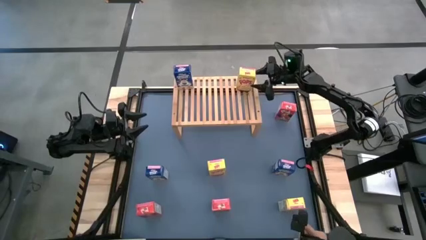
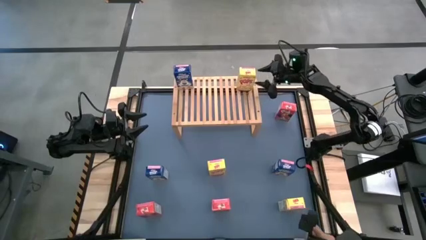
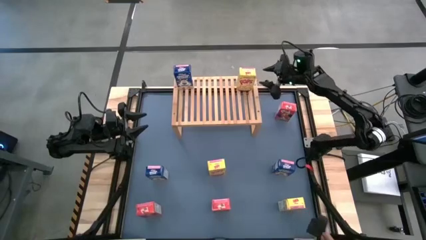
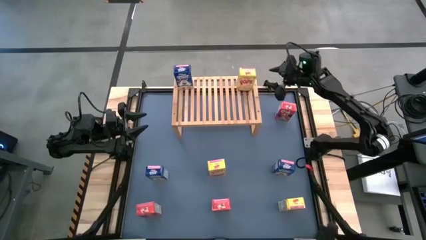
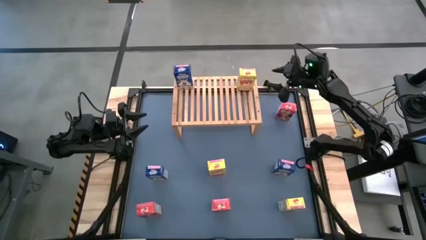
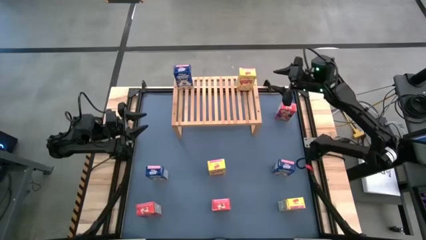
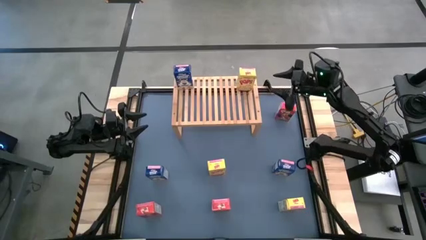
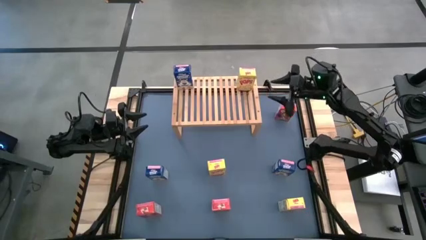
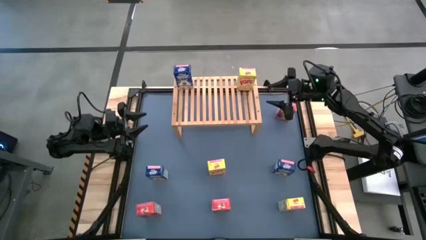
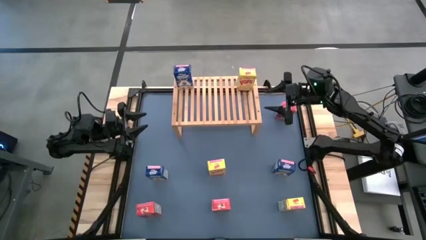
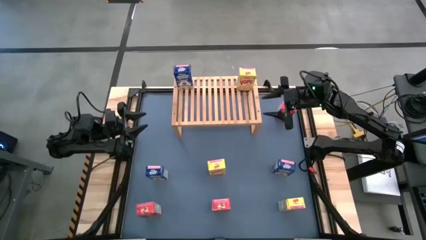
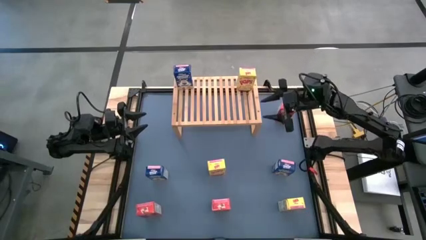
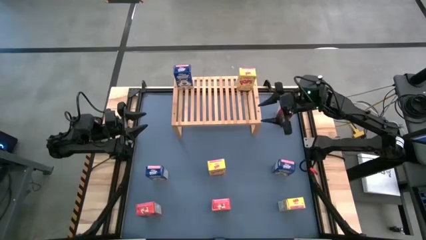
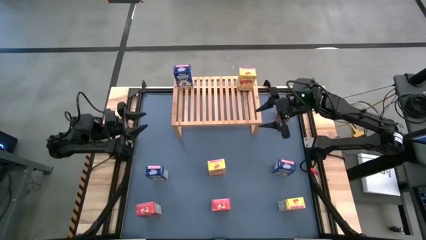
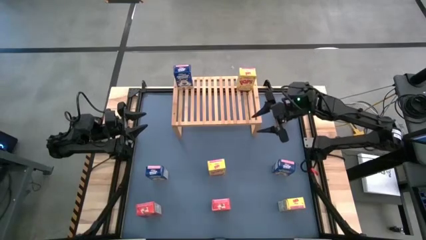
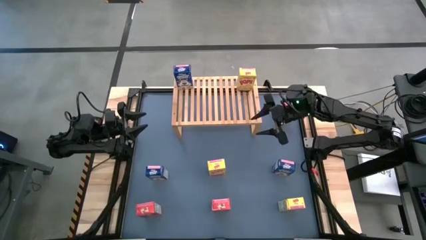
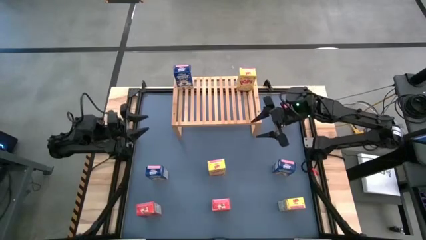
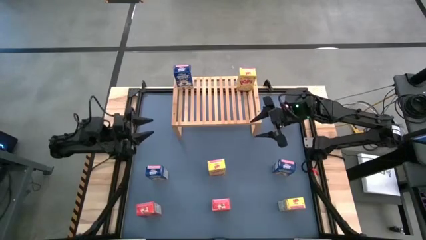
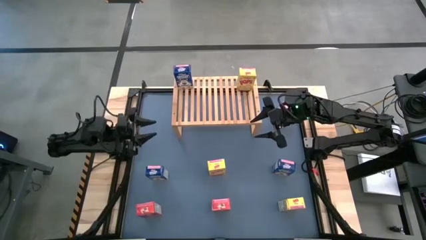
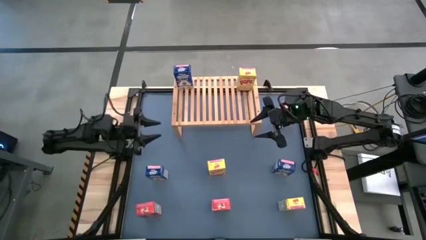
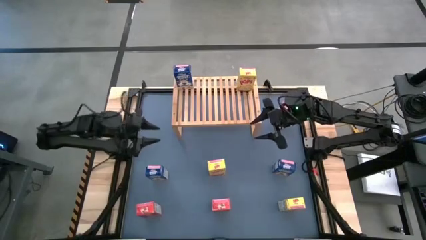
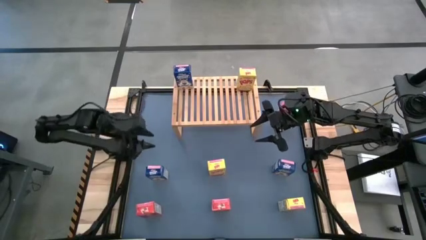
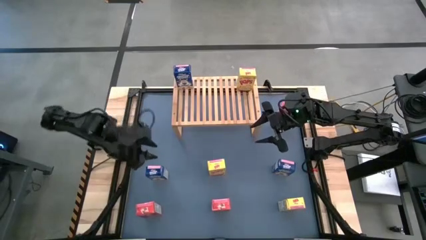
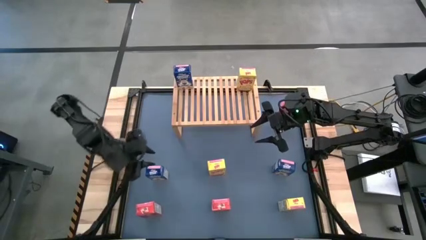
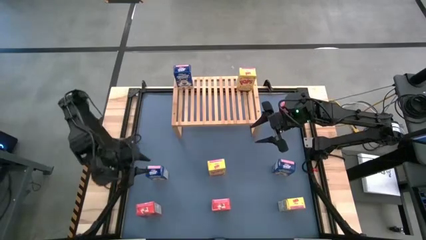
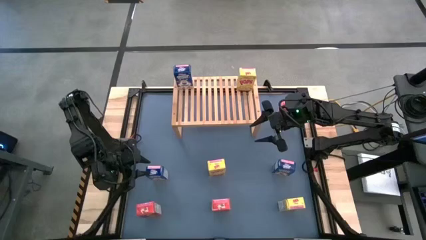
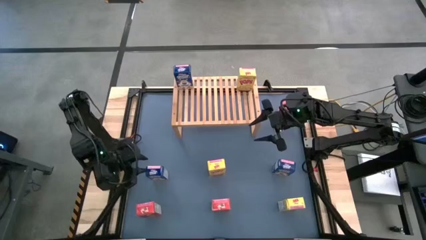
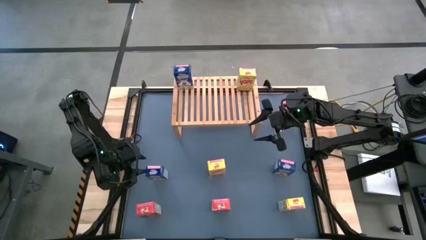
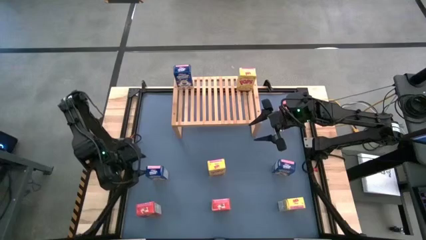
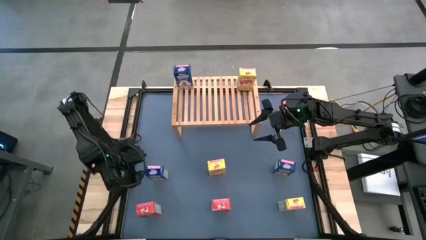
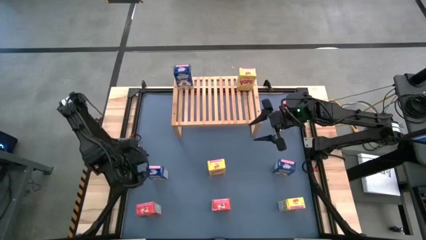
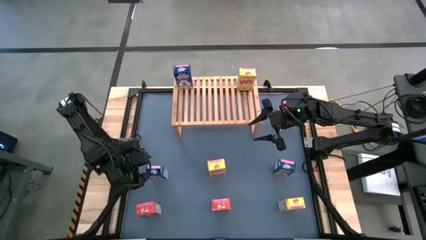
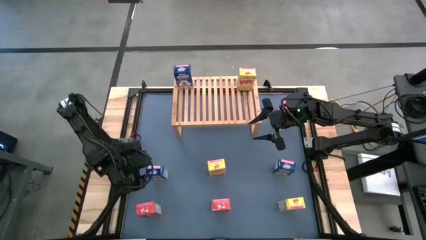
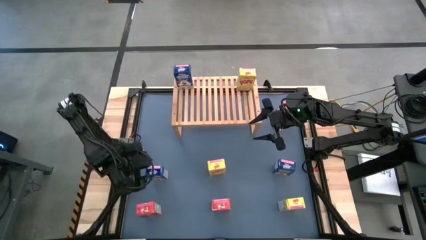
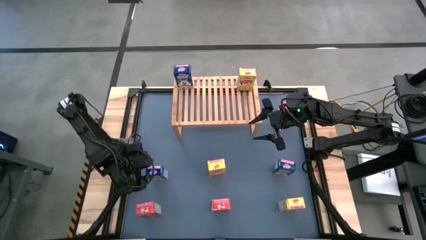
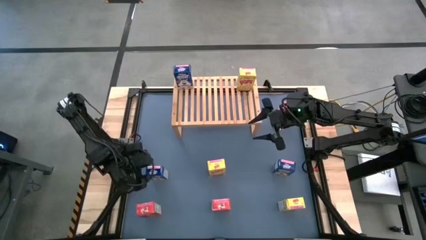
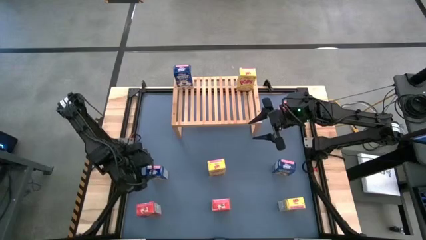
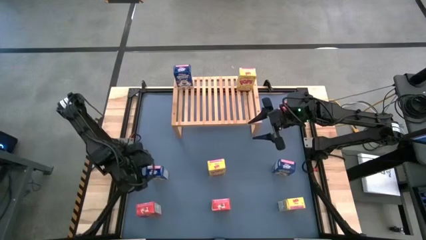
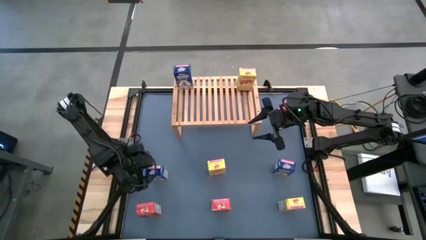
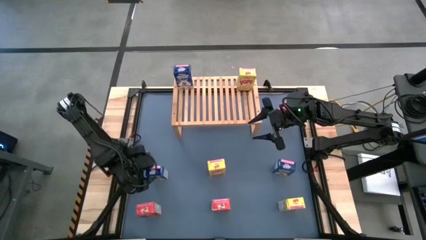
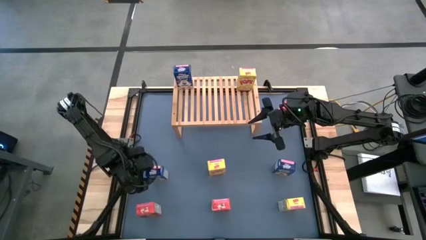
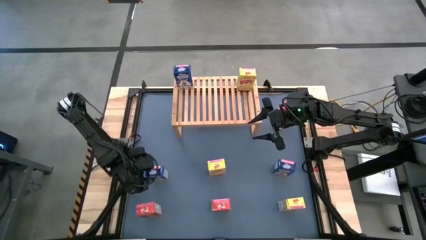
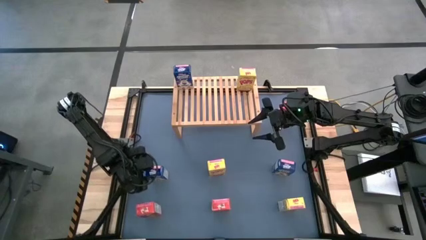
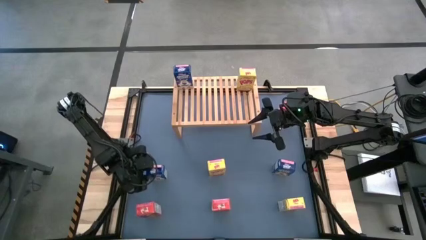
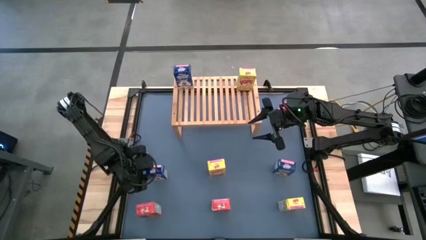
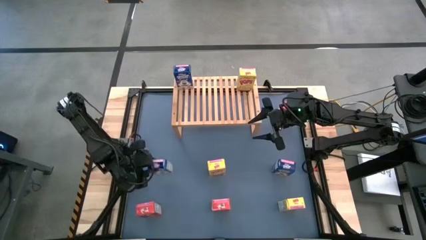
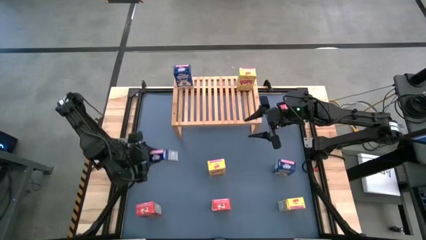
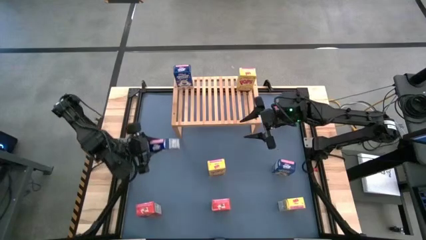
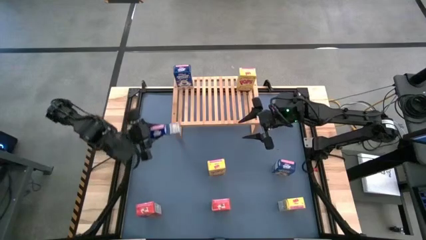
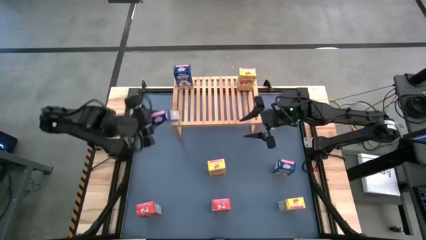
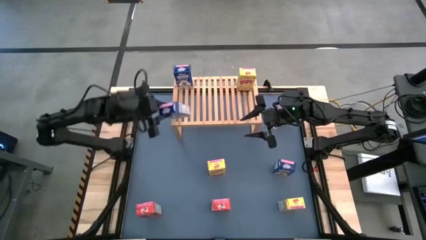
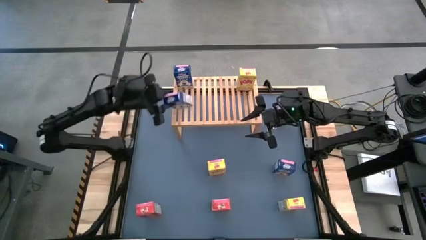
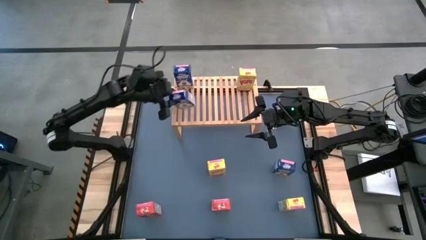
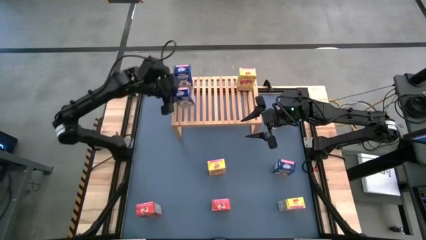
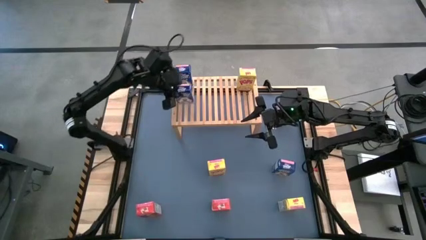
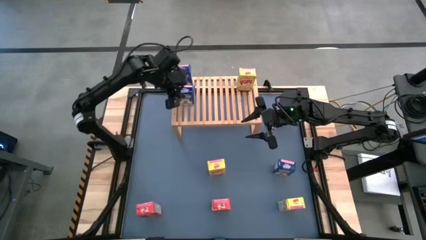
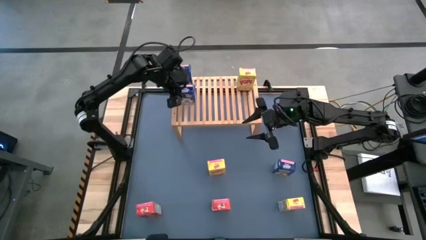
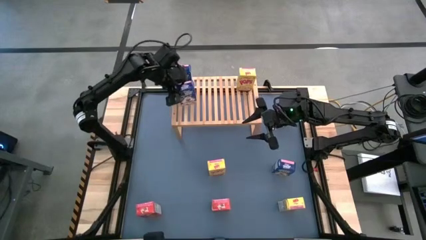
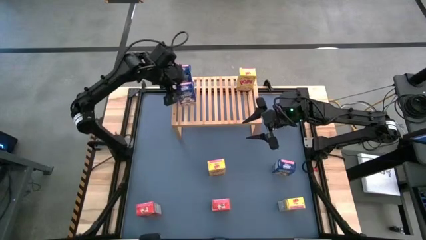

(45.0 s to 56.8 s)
Task: Stack cereal on shelf
Put the left blue cereal box on the shelf aligned with the other blue cereal box

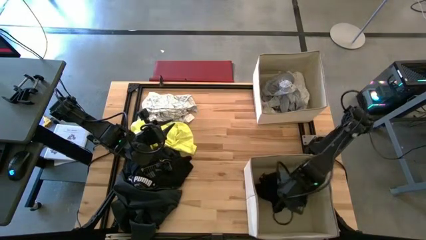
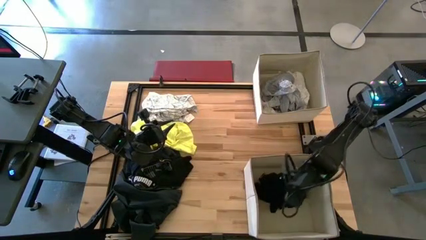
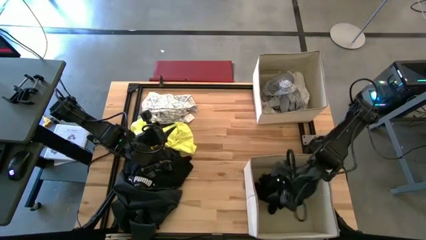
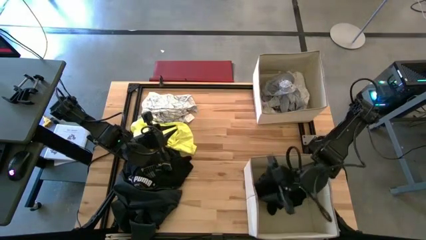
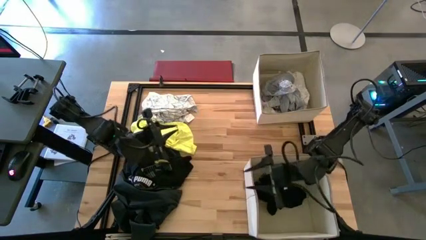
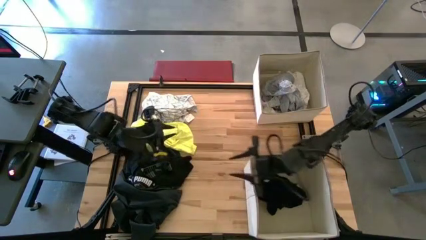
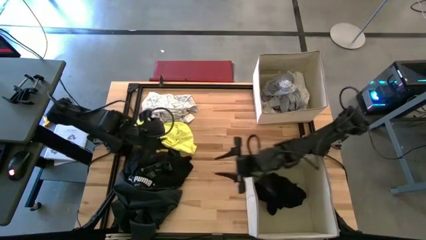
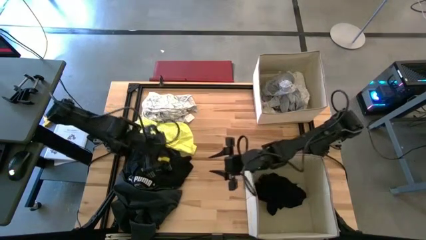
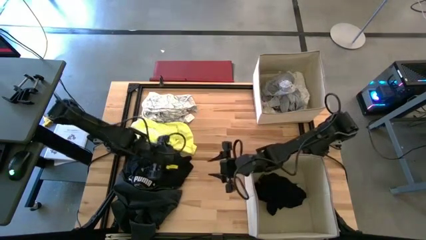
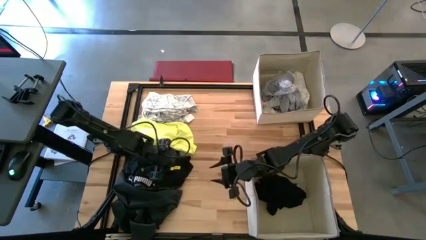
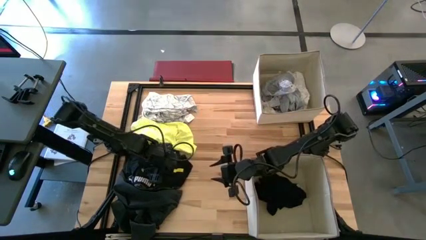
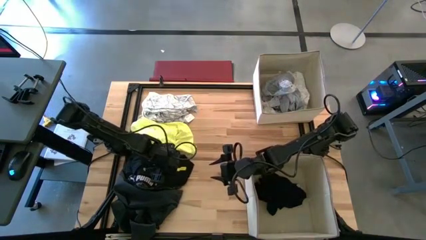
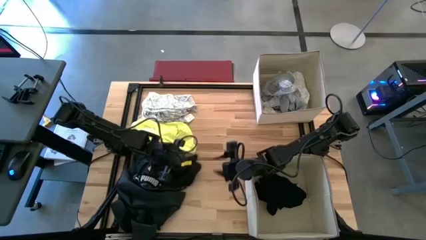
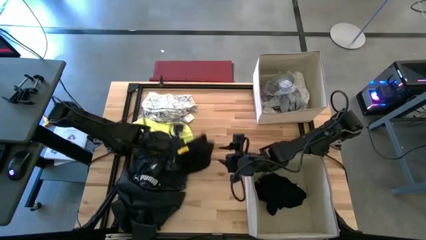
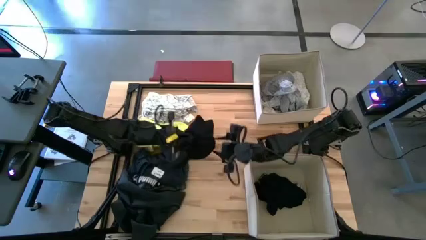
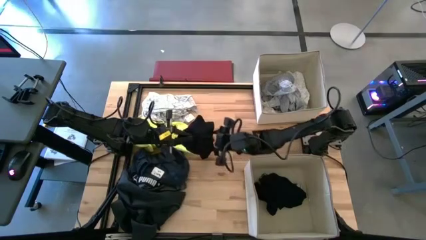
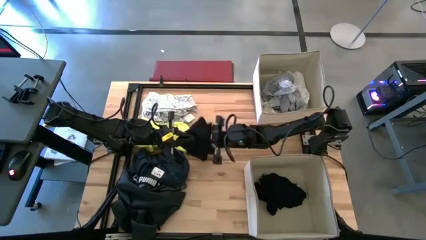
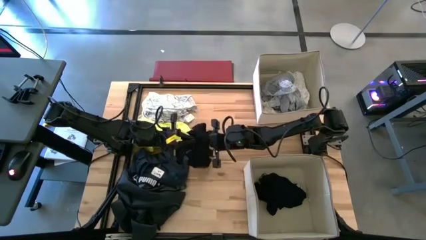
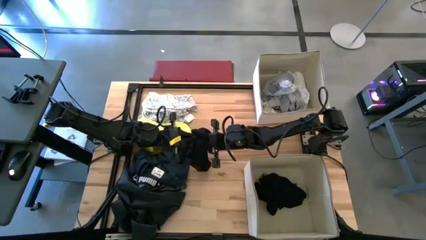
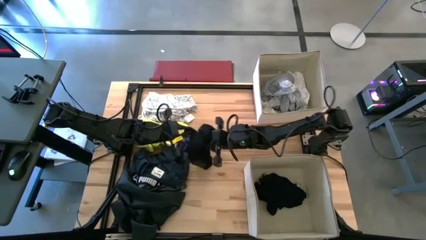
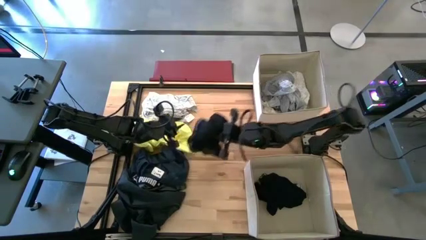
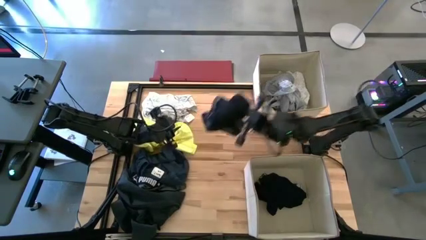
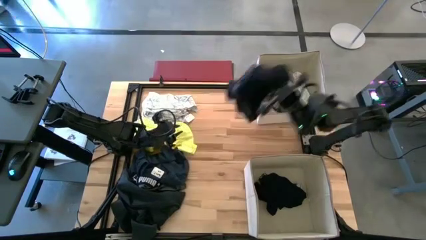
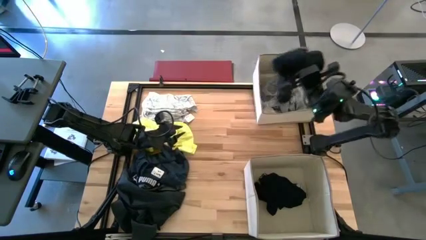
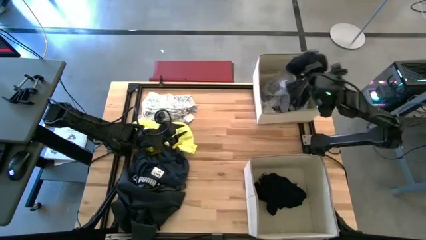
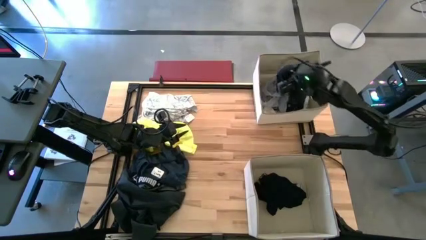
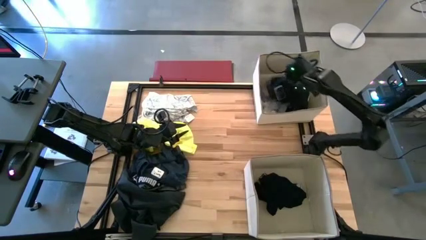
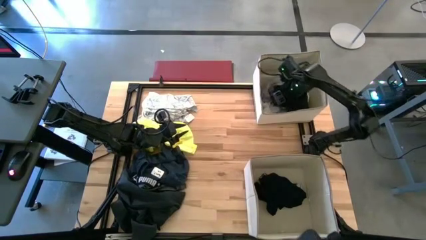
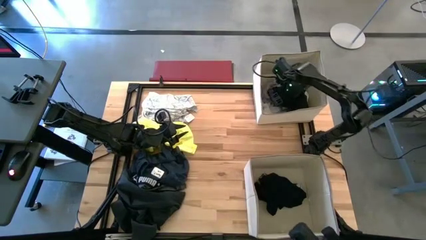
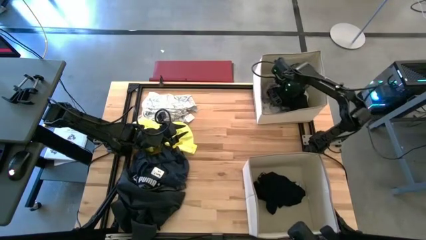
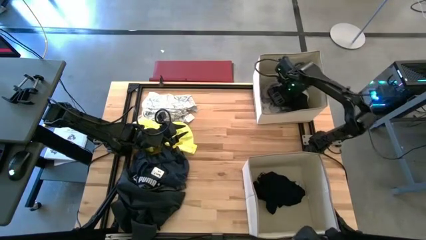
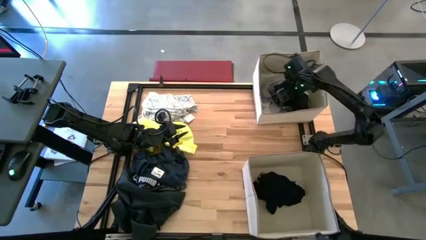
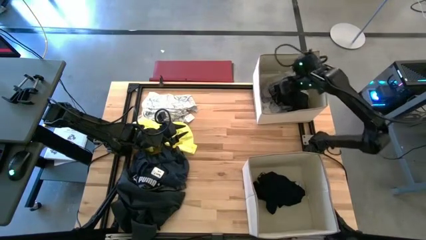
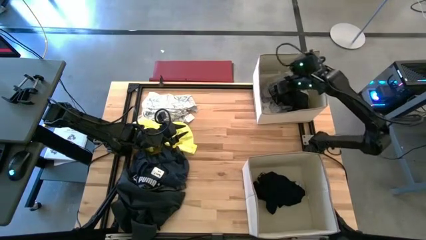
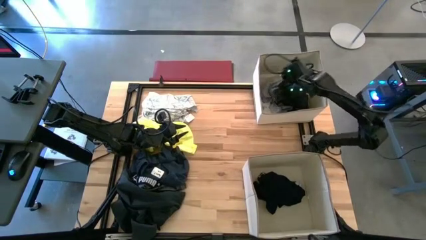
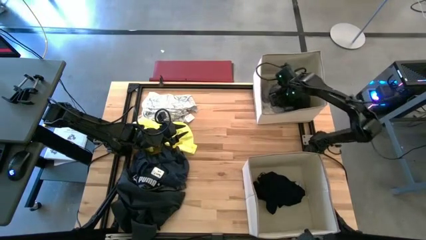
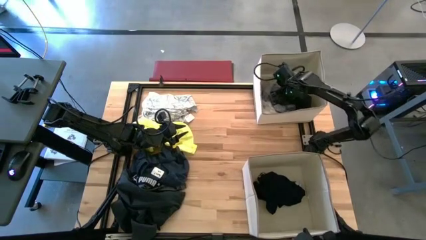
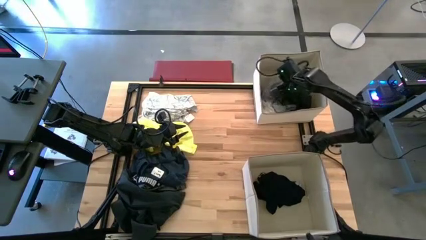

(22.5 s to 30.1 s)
Task: Sort clothes
Put the black underwear in the top white bin
